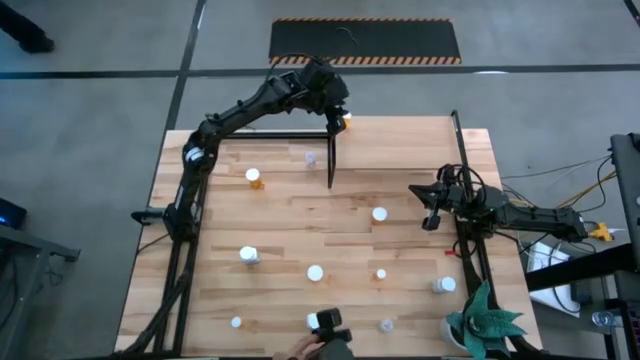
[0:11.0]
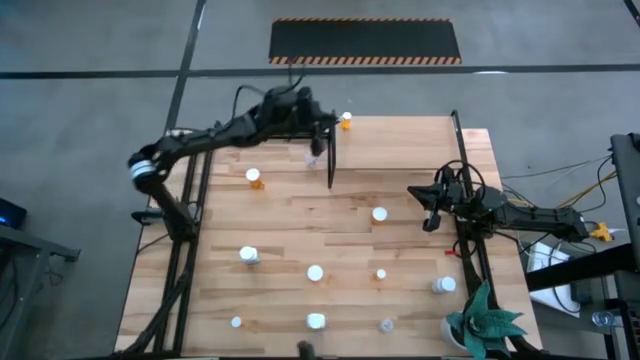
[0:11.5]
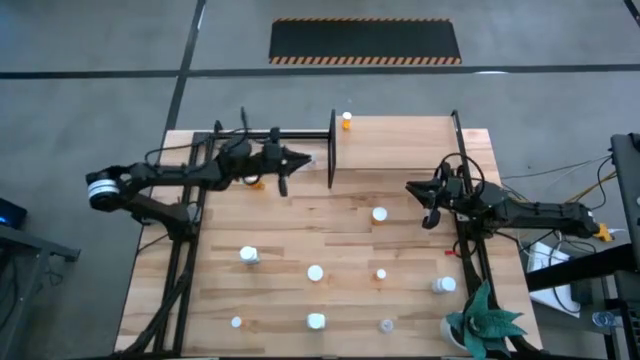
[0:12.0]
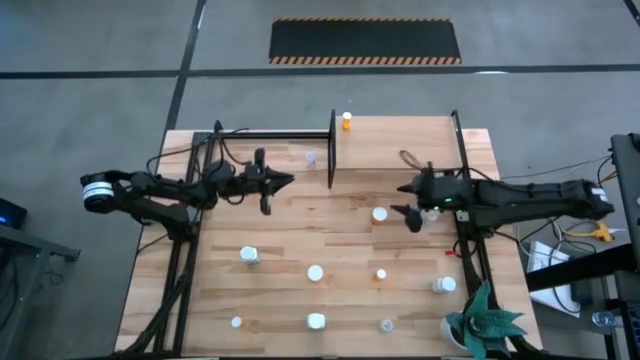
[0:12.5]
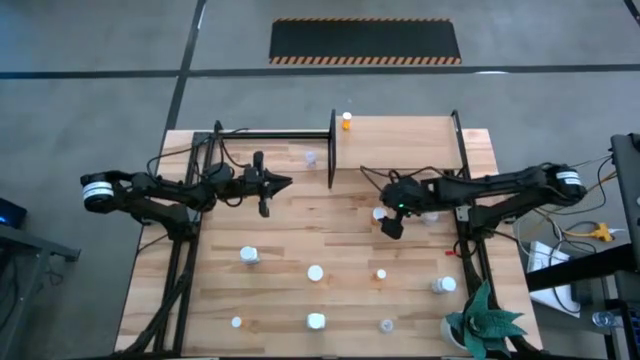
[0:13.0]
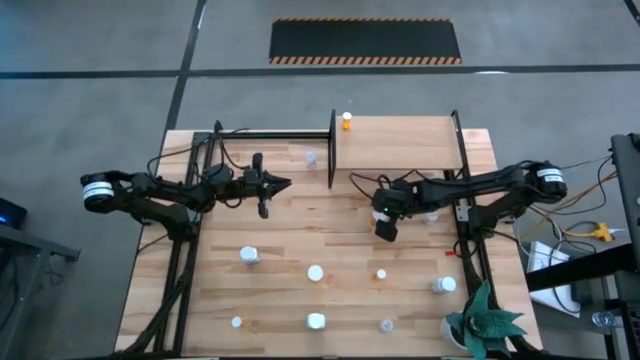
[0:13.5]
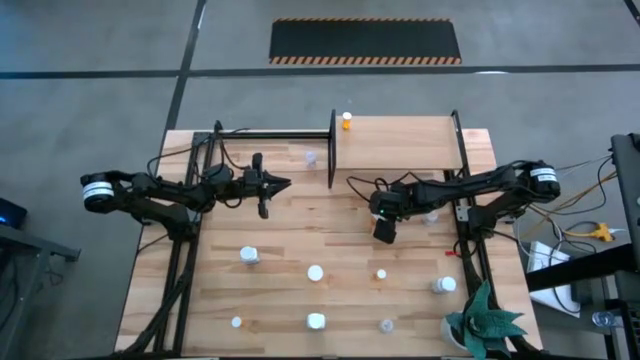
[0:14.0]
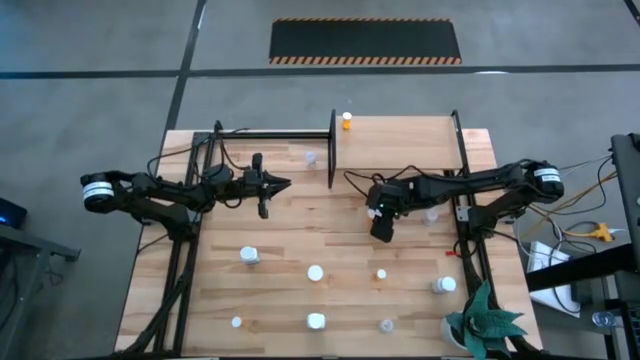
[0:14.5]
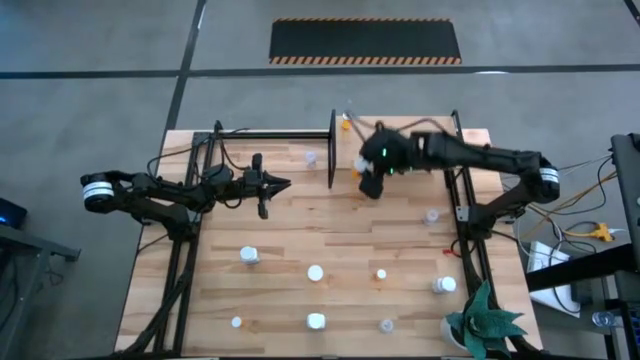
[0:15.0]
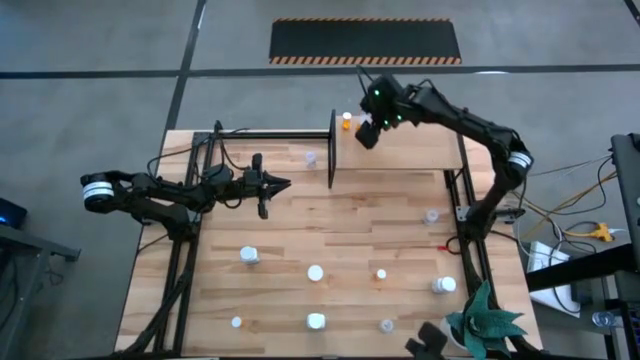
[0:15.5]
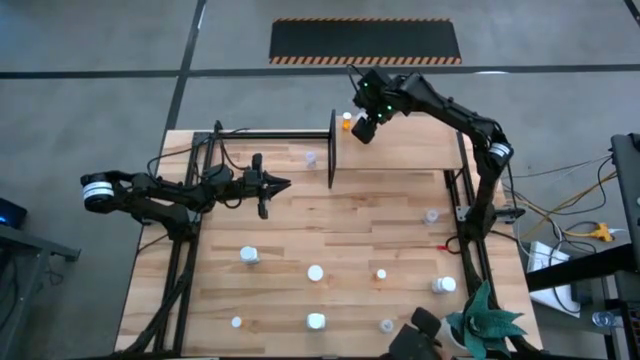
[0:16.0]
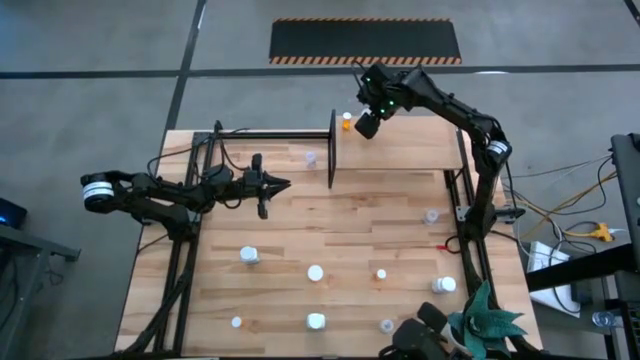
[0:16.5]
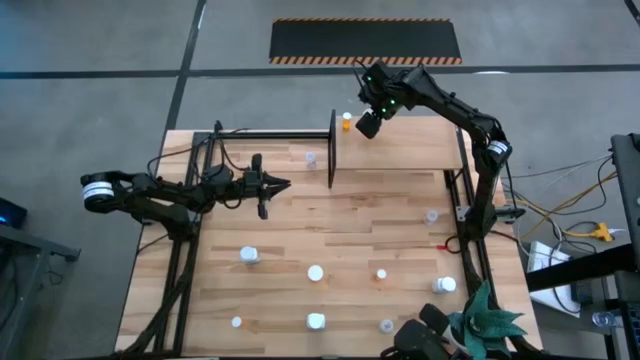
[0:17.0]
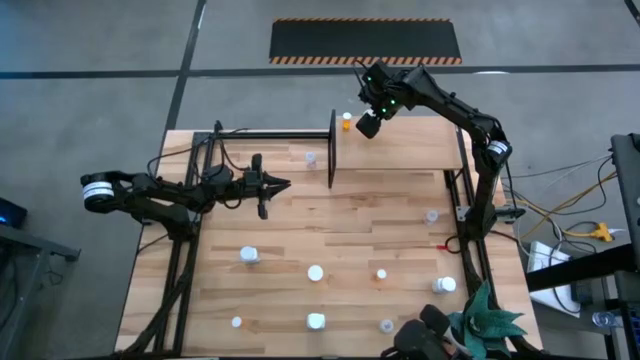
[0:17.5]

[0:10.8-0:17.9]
Task: Pick and place medicine bottles onto shelf by color
Put the middle big orange pill bottle on the shelf

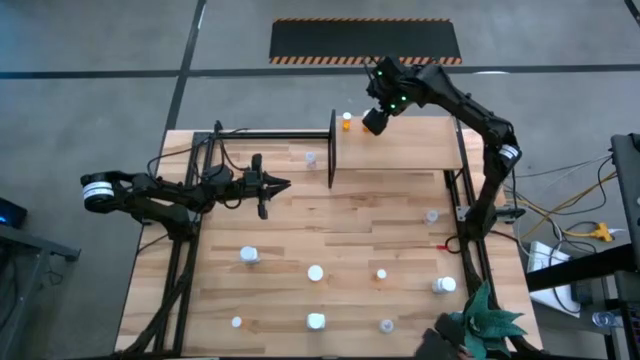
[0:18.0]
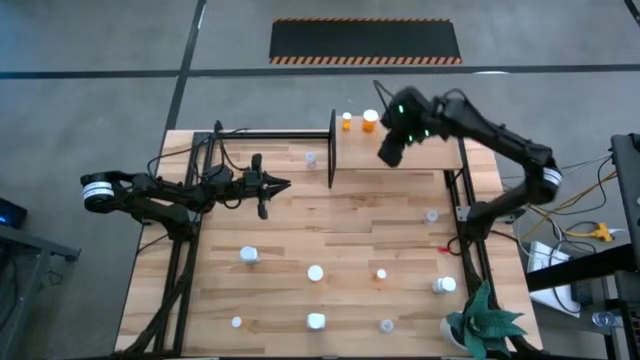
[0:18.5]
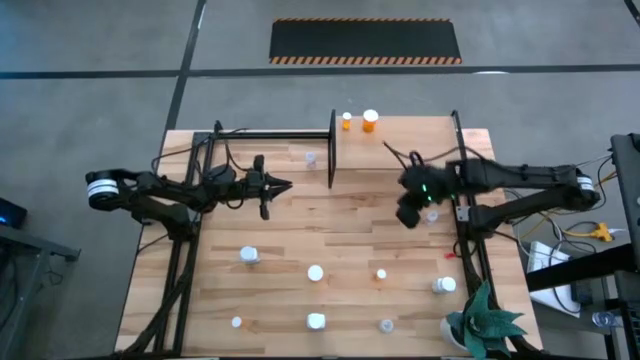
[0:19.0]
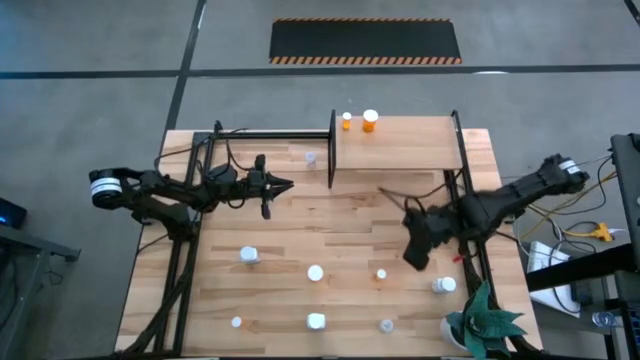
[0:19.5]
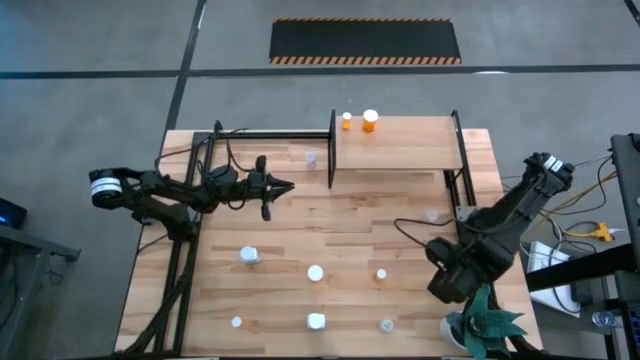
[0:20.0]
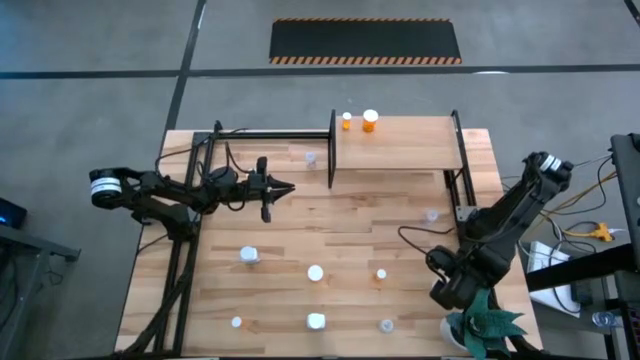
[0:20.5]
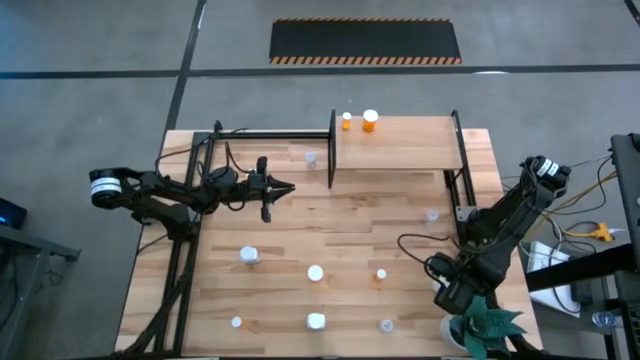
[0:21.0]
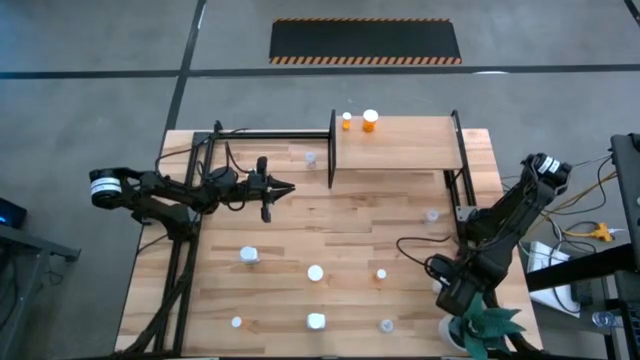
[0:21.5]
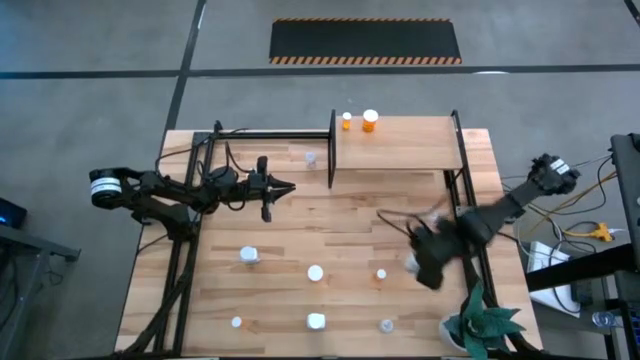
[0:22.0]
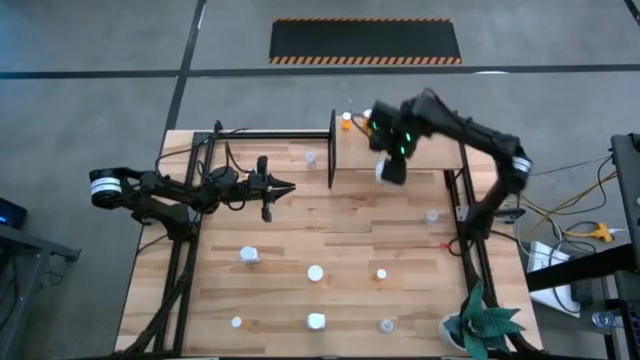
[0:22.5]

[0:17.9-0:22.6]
Put the middle white pill bottle on the shelf

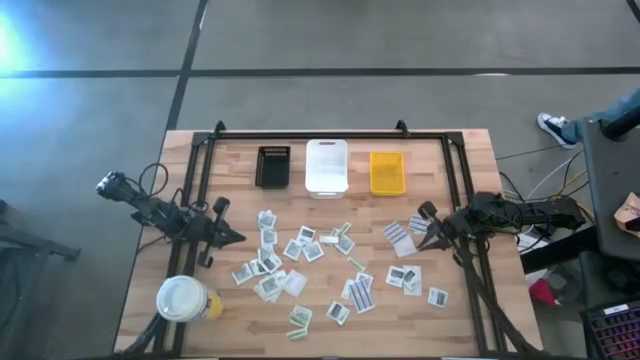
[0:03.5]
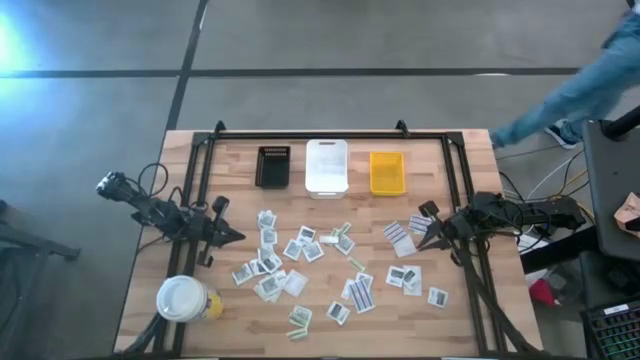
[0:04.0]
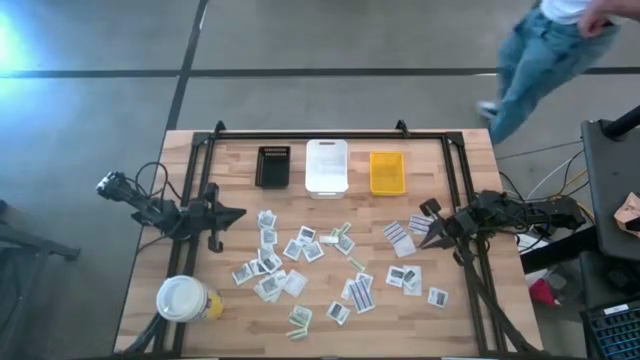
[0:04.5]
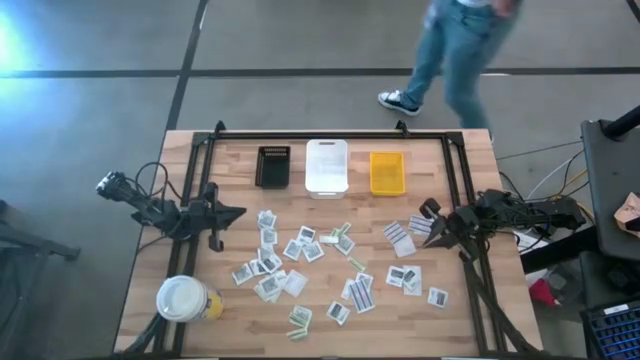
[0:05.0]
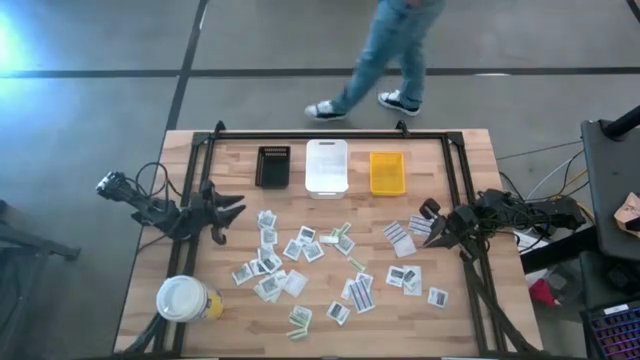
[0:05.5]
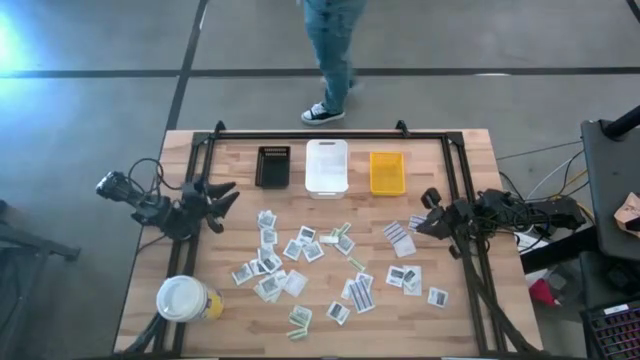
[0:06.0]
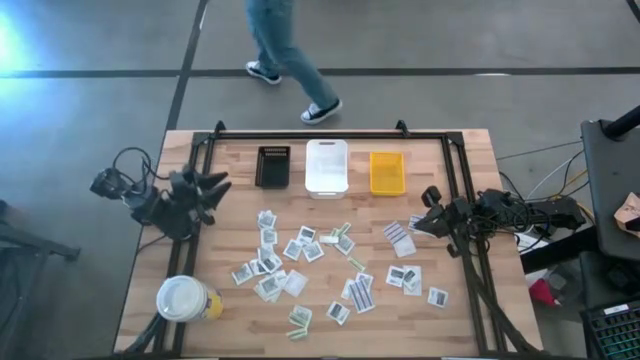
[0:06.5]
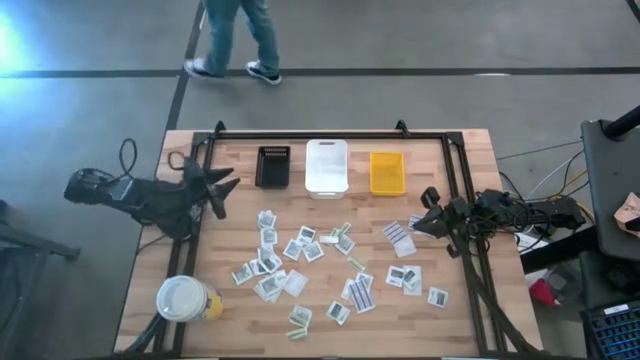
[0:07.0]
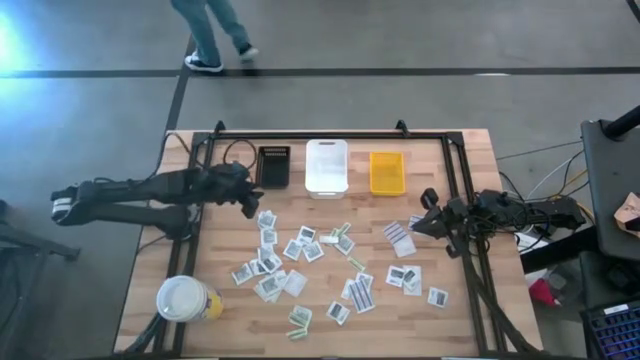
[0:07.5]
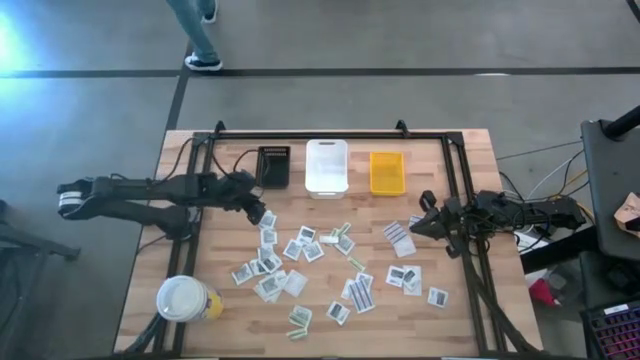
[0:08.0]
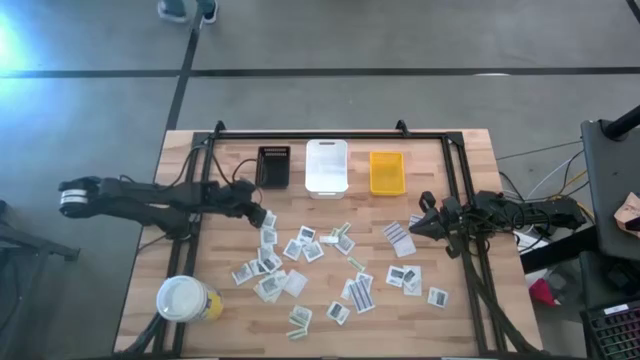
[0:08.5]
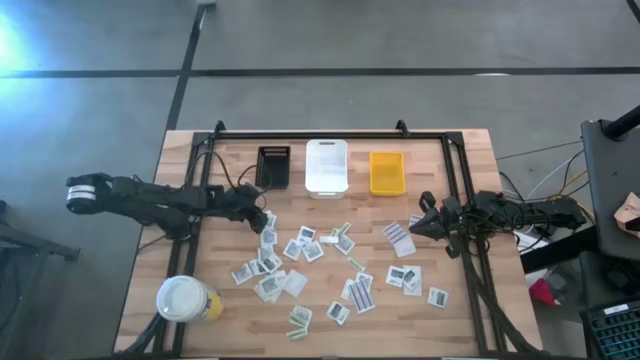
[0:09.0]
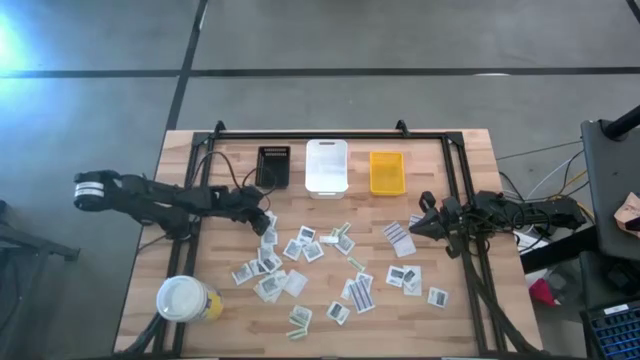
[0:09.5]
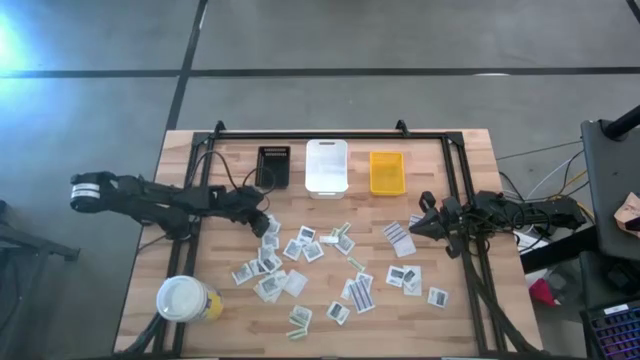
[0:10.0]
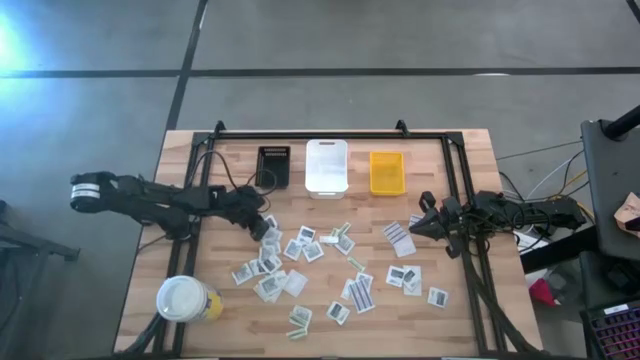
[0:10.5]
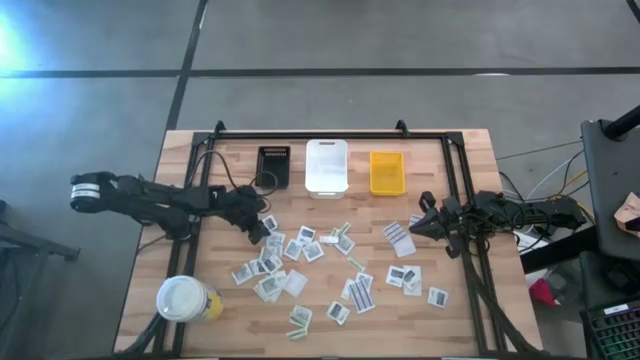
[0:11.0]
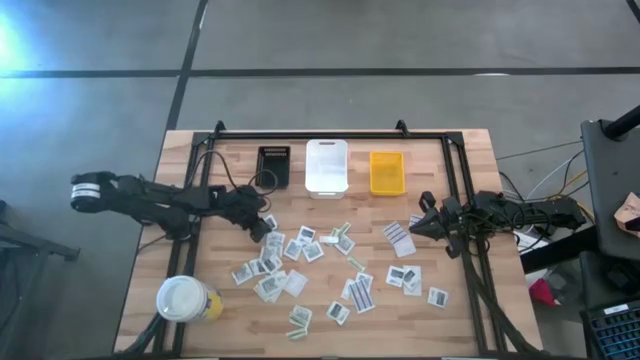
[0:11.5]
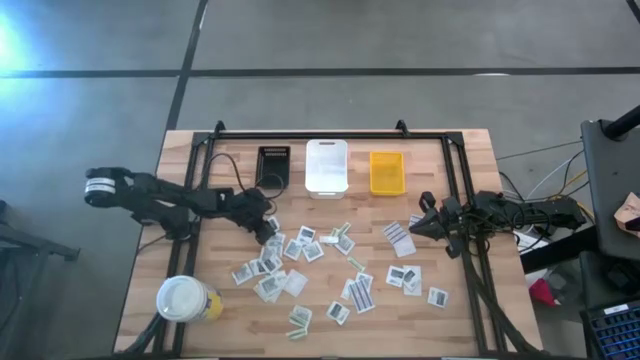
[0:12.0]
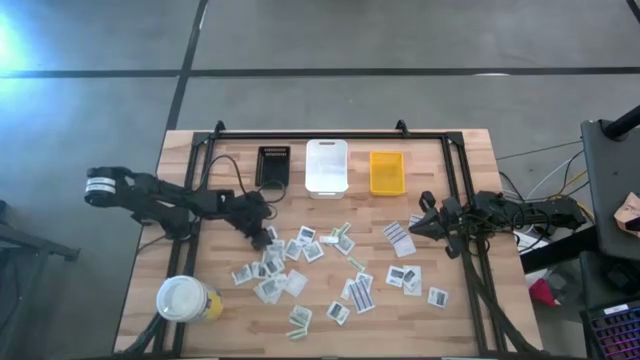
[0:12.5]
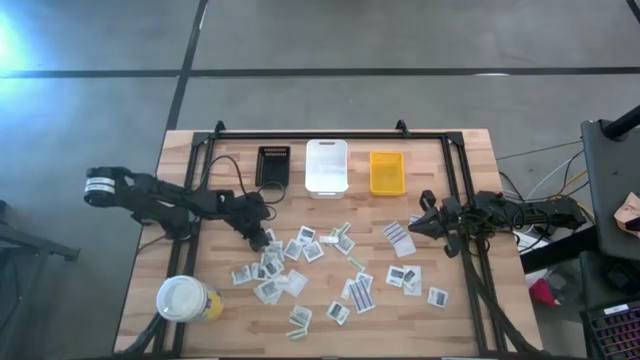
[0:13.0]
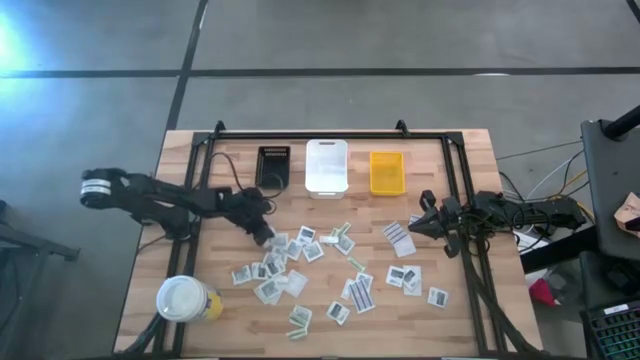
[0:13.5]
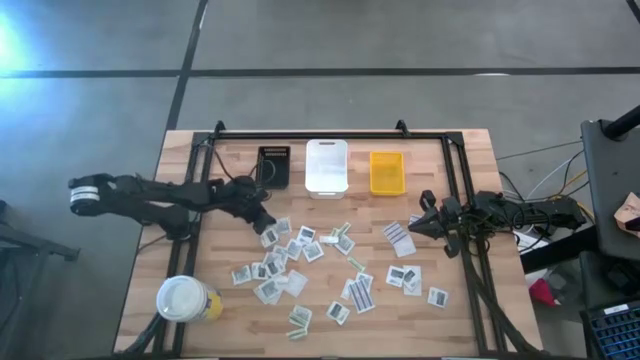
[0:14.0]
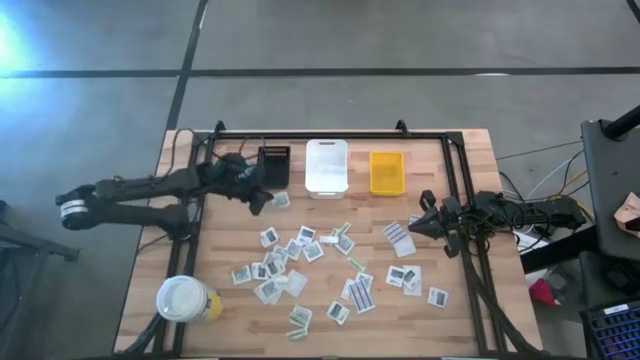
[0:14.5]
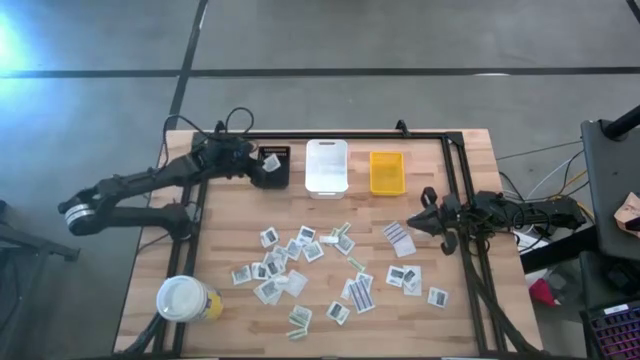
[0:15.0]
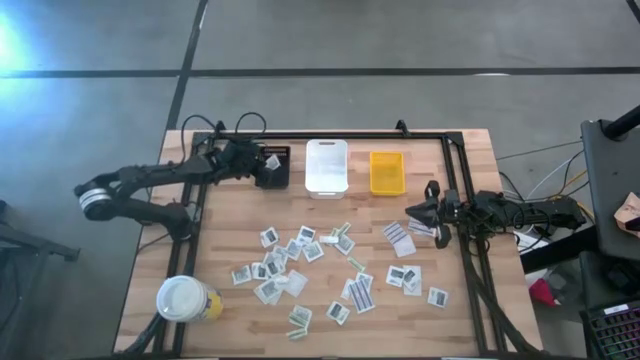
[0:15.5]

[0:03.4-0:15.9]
Task: Pick & Place First Aid Supplies
Put the towelette pack into the black basket
